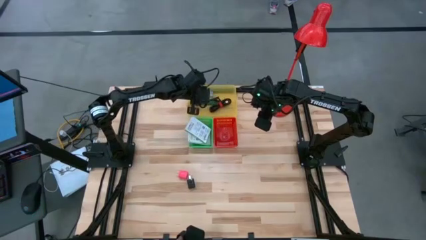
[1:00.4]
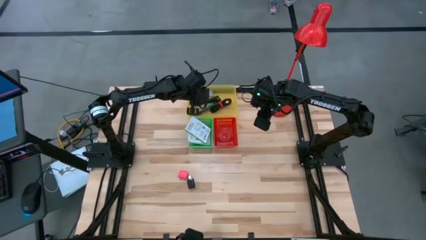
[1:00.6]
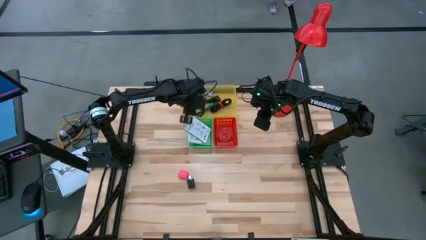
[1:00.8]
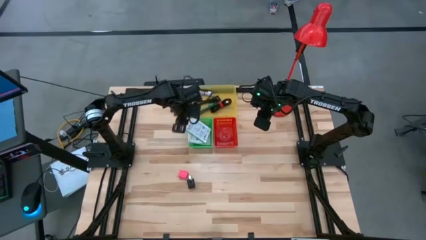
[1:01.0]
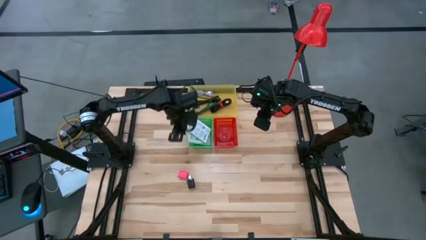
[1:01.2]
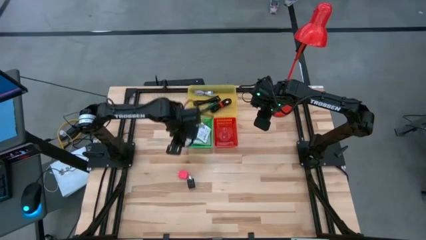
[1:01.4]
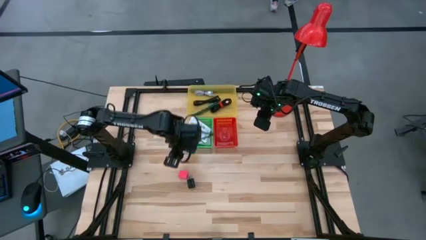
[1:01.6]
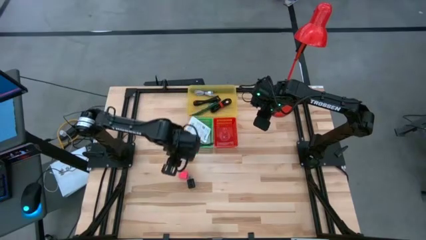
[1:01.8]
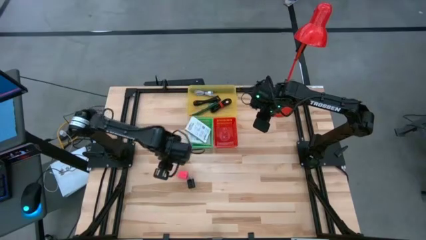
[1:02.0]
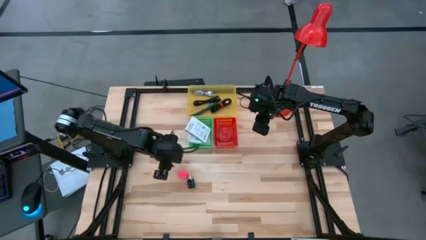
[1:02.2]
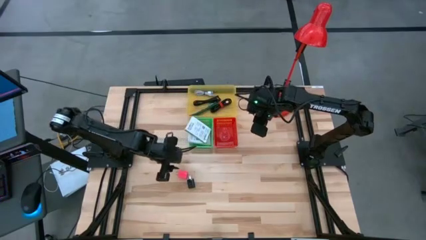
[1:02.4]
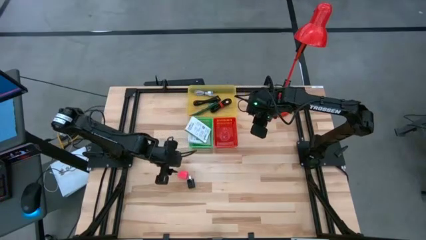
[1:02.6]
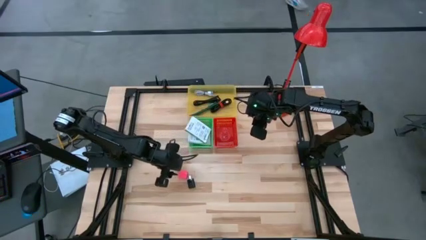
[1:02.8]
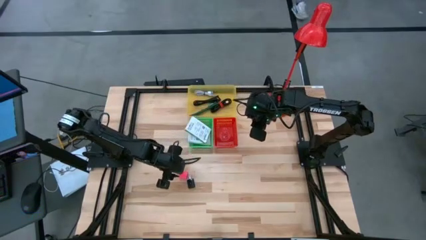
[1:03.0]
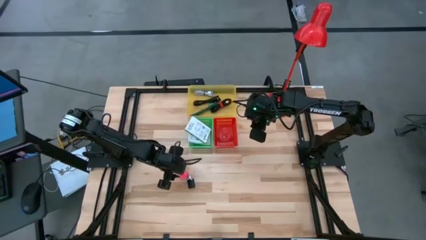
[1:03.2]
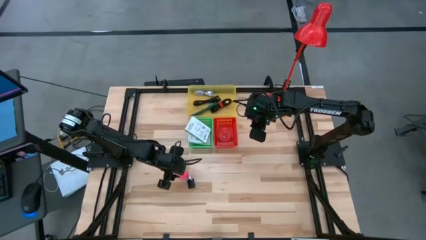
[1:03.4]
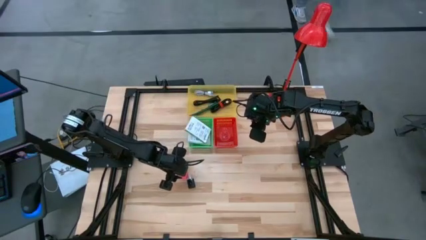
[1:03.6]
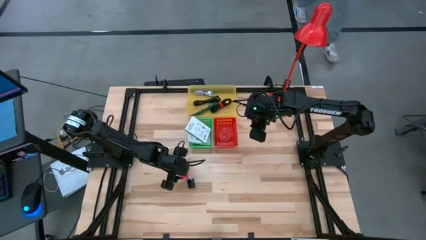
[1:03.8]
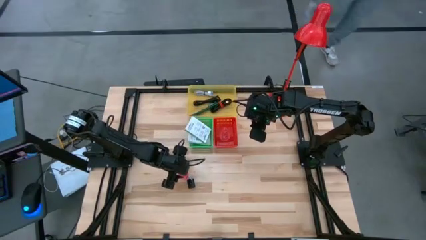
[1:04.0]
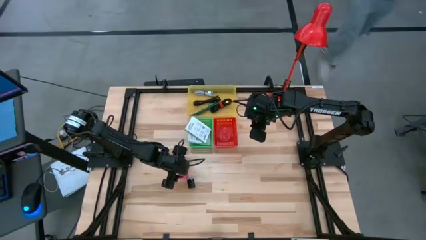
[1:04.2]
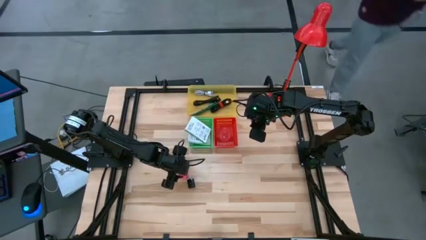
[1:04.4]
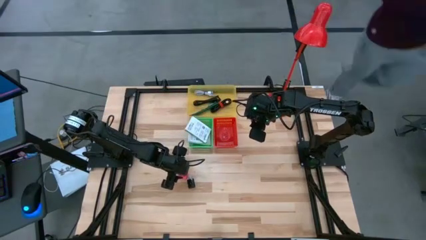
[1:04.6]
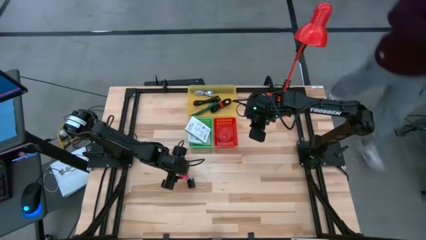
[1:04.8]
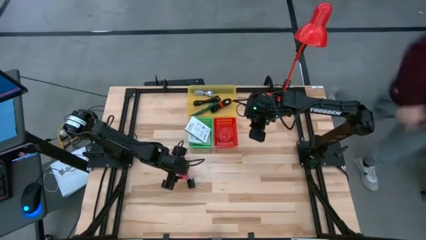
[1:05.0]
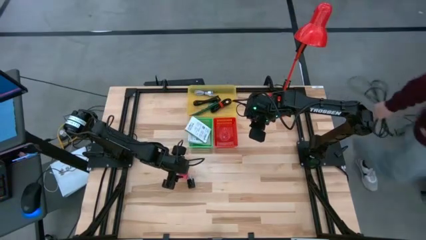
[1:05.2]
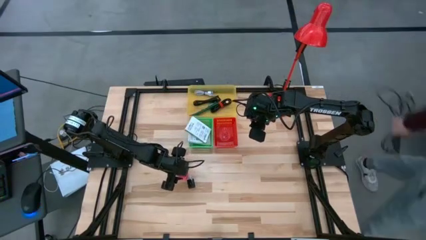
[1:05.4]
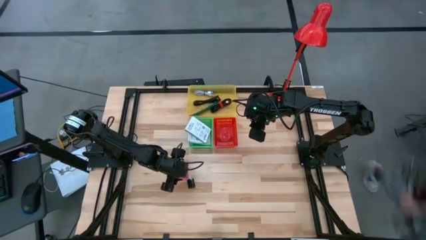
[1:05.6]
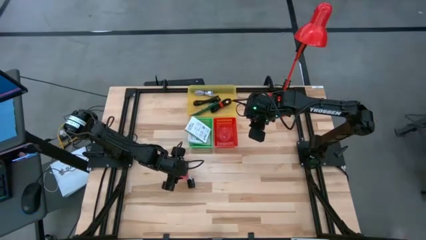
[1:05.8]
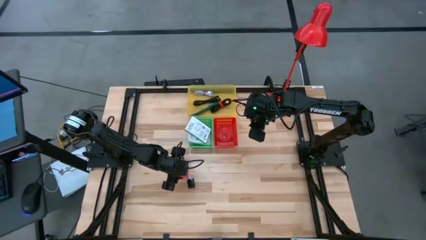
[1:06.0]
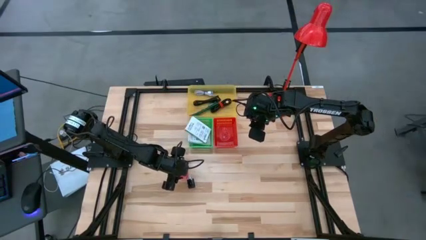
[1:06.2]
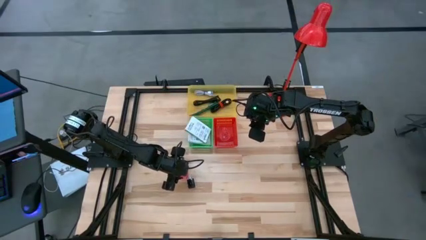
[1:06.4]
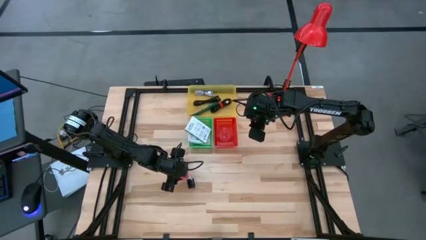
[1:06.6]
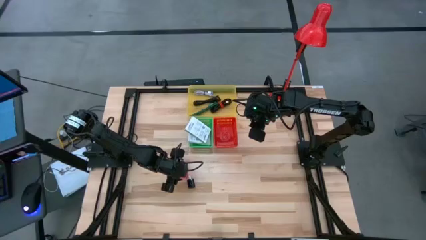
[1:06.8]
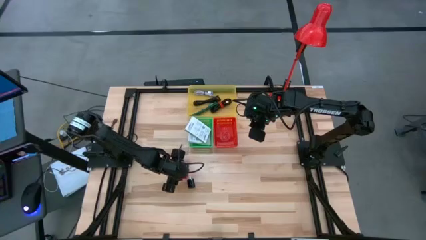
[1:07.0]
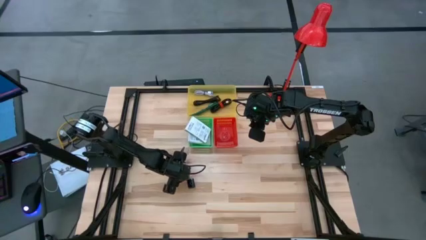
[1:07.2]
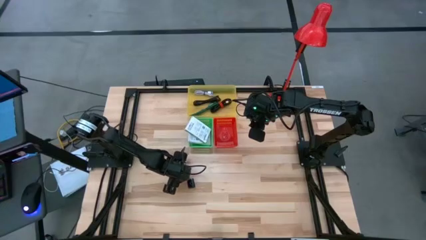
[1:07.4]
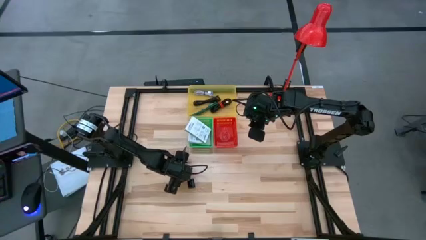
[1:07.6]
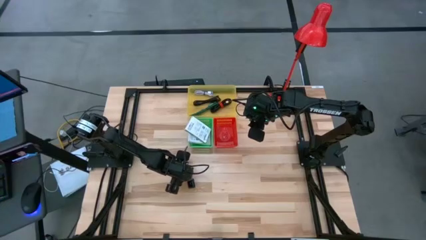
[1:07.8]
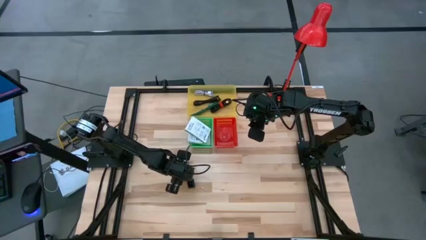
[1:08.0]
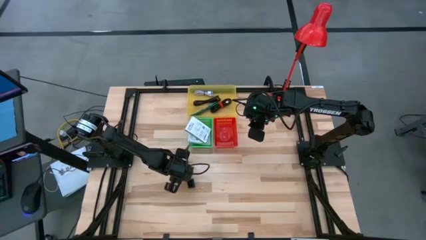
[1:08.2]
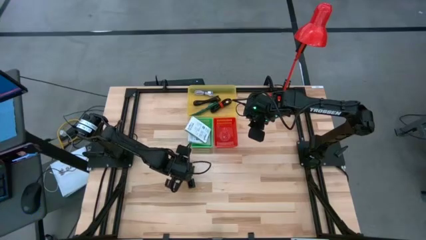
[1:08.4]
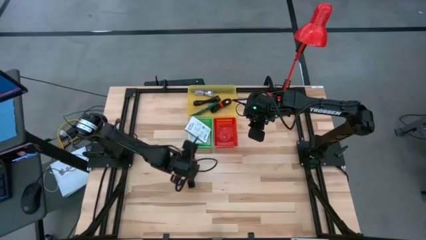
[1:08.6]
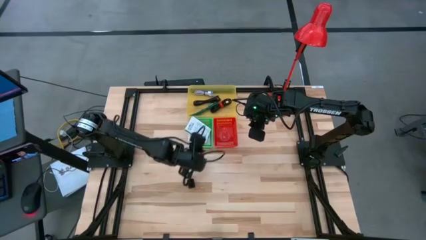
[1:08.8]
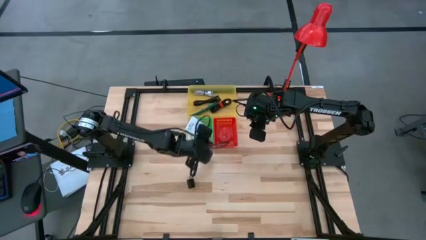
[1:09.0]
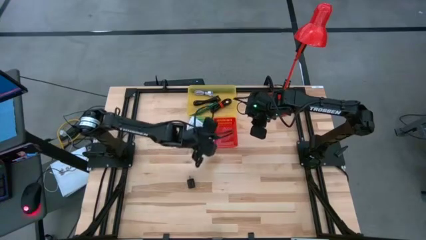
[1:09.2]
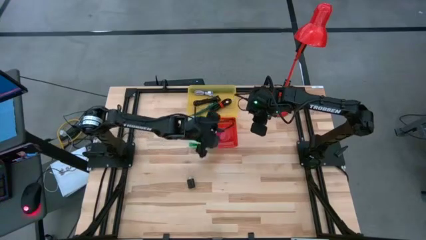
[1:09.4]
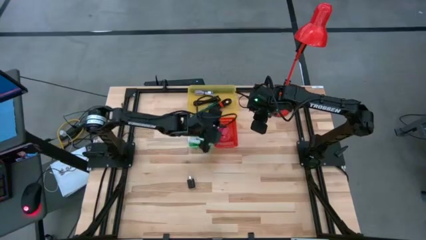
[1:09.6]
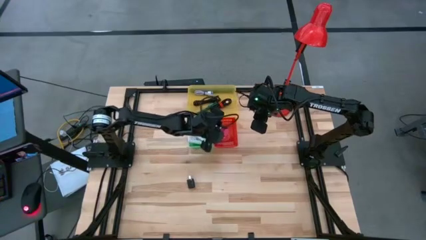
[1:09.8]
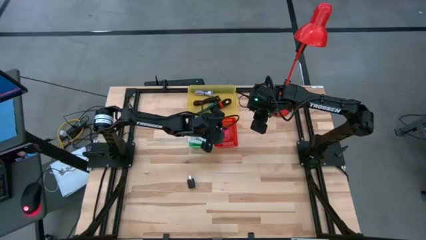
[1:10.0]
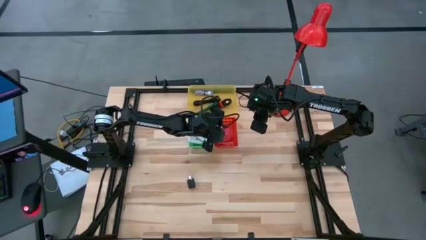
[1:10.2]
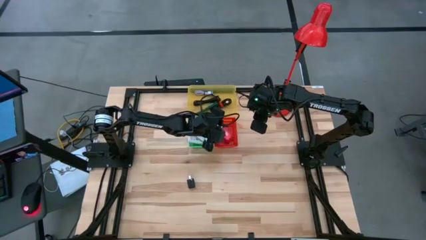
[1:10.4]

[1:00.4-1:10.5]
Task: Pick and place items into bin
Put the pink charger adapter into the red bin

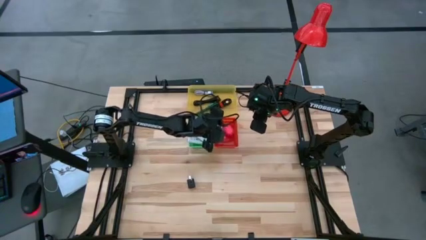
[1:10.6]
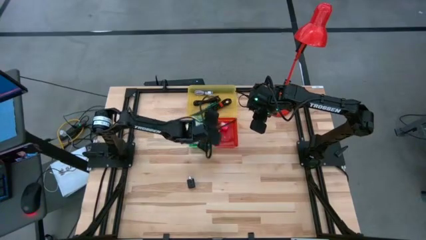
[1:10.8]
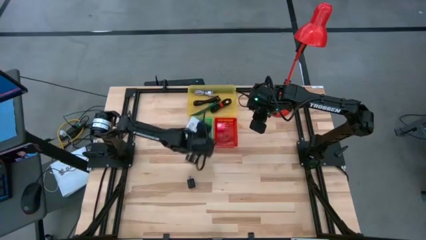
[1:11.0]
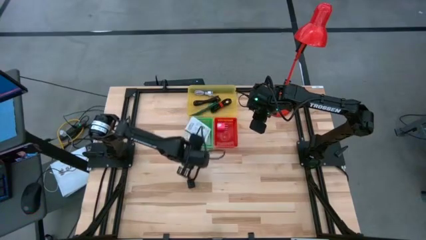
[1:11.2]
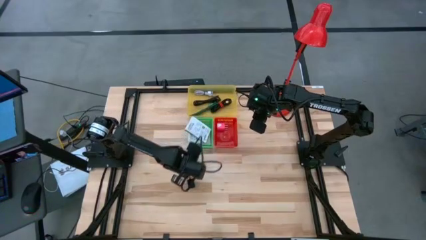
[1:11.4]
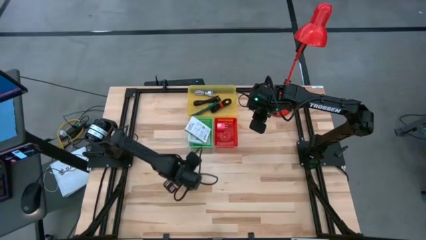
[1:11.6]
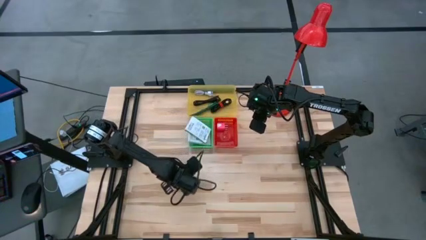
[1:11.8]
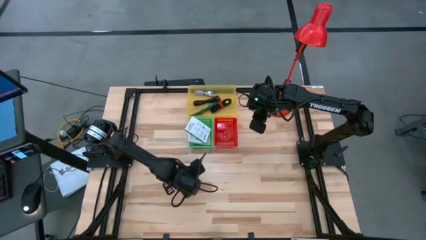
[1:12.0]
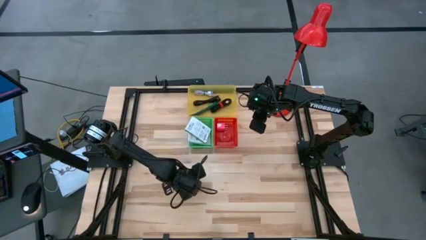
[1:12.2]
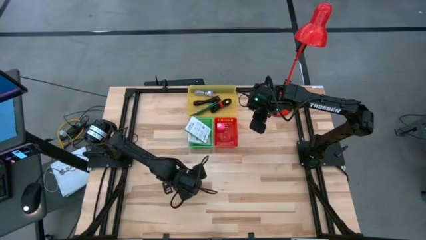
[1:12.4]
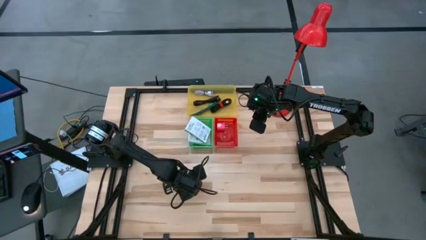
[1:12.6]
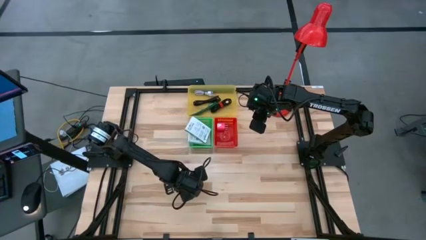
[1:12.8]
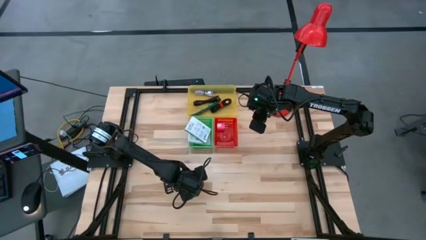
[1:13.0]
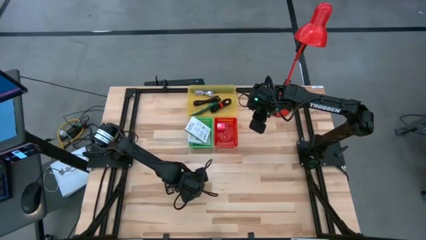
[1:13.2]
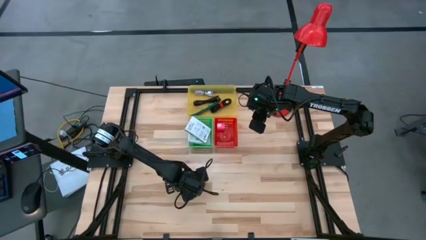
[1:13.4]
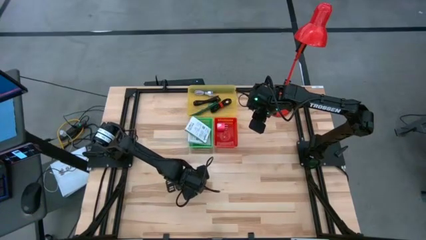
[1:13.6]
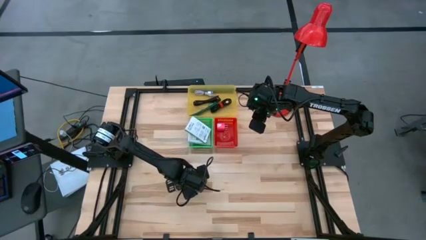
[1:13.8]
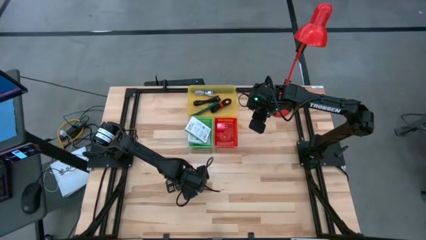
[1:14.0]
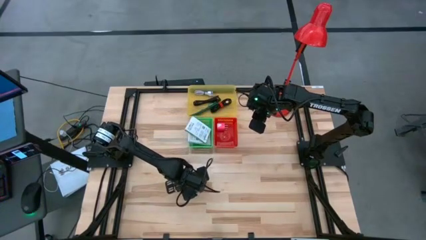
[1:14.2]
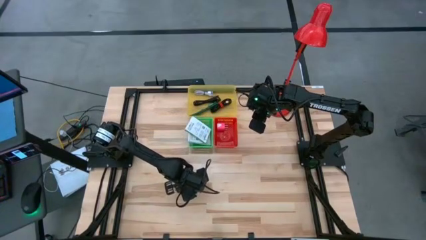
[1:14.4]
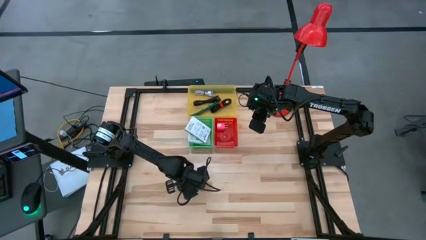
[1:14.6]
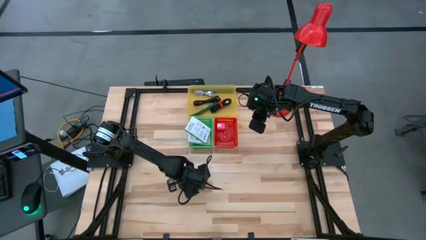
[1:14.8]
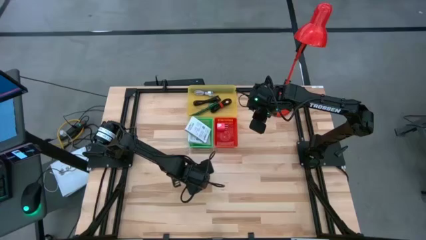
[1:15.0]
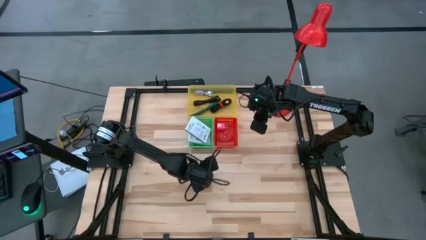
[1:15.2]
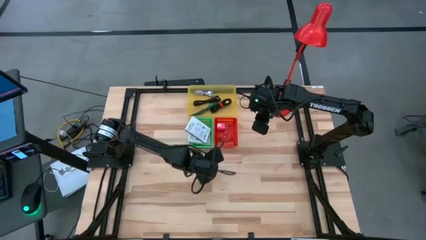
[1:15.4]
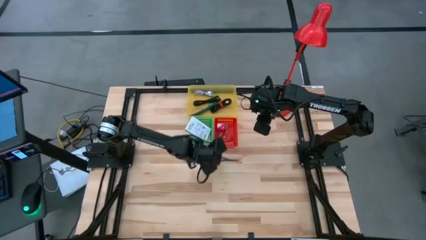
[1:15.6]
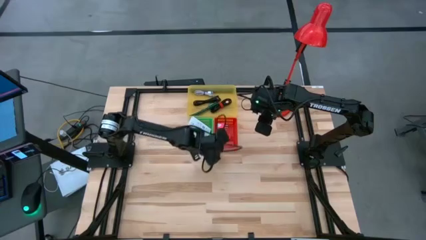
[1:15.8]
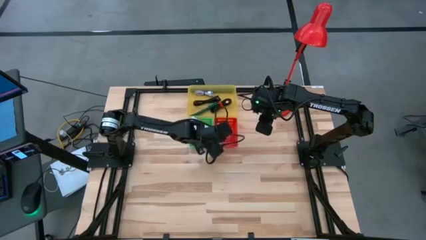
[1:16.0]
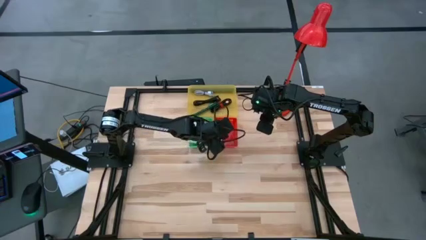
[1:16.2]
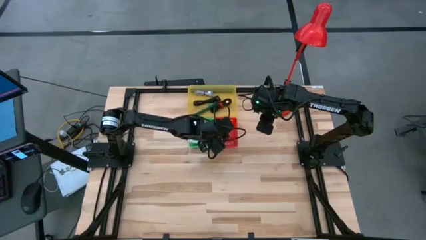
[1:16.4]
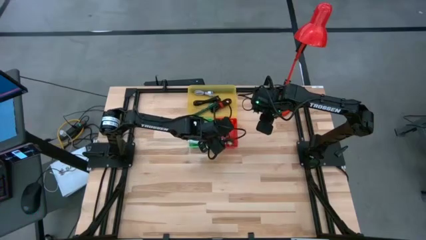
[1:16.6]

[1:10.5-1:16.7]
Put the black charger adapter into the red bin
